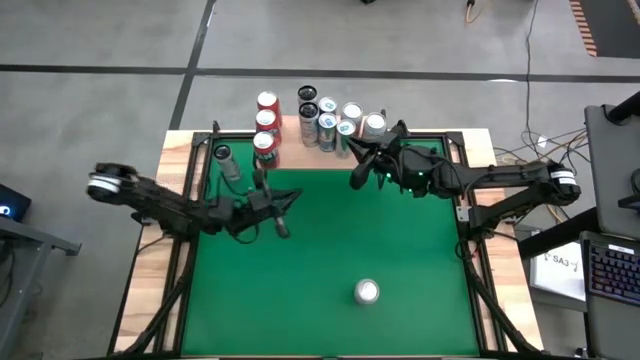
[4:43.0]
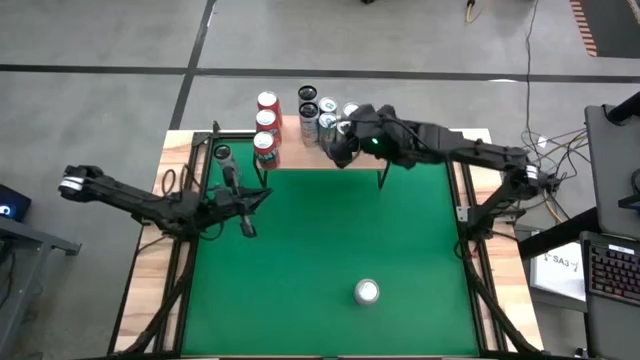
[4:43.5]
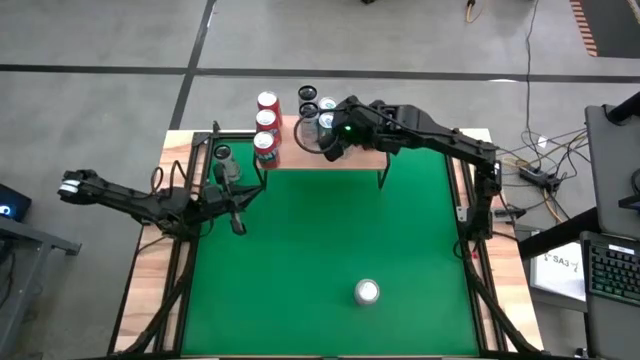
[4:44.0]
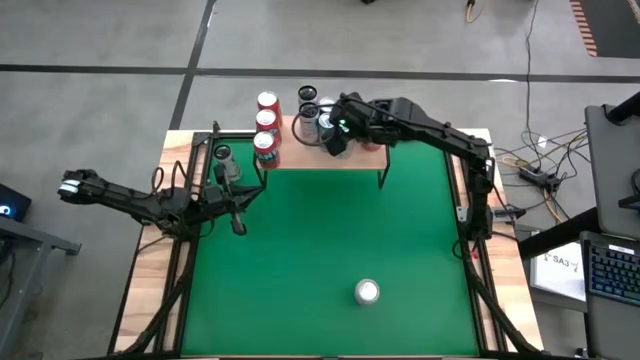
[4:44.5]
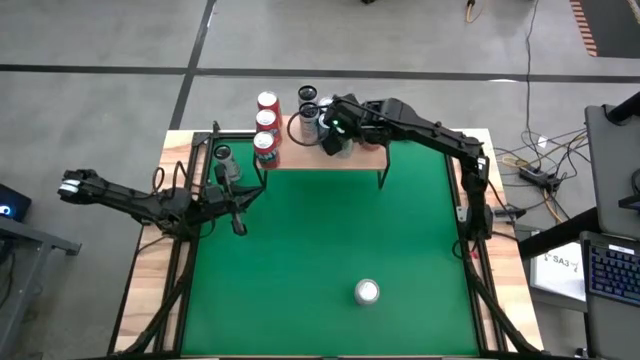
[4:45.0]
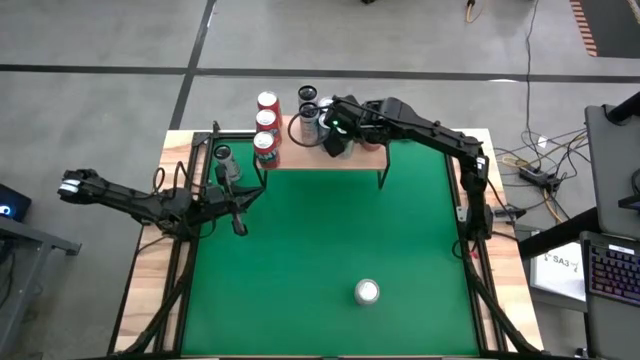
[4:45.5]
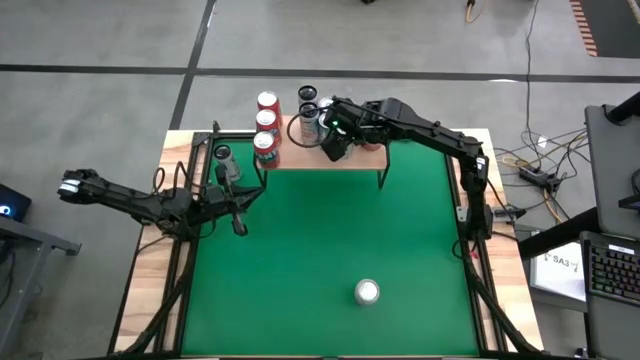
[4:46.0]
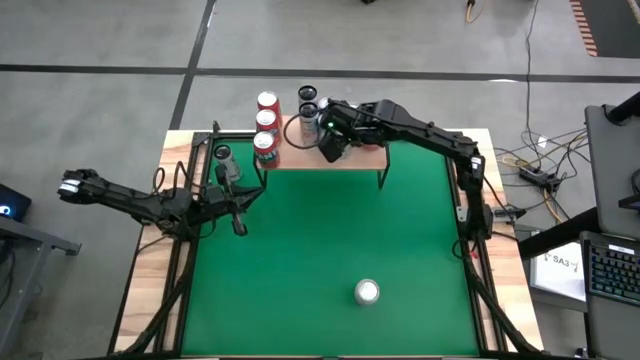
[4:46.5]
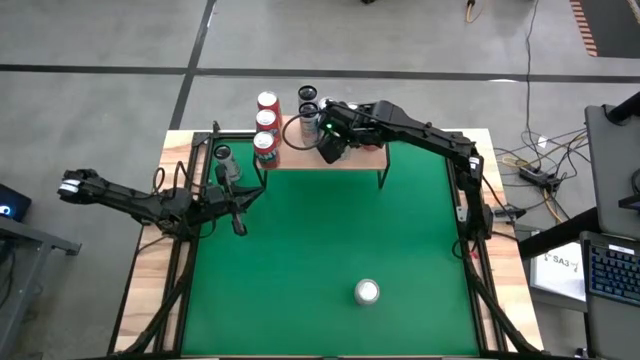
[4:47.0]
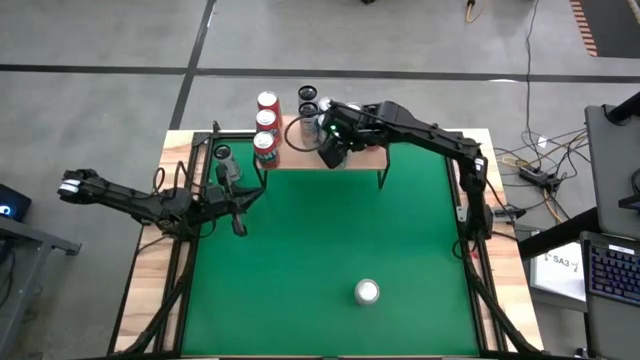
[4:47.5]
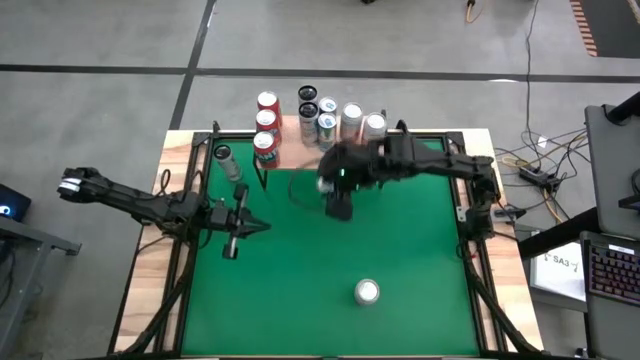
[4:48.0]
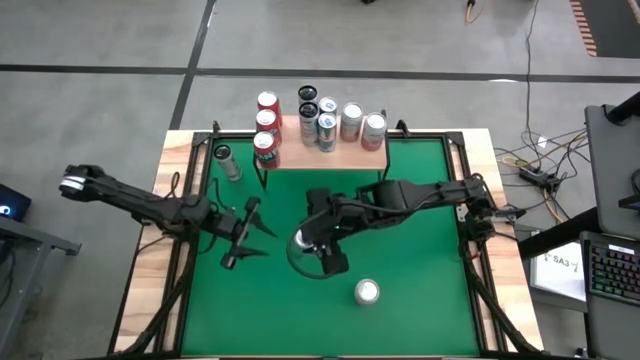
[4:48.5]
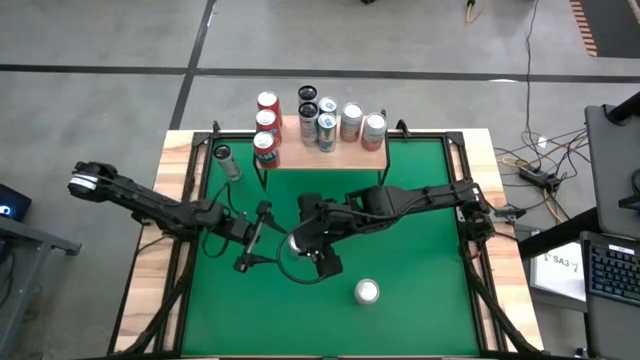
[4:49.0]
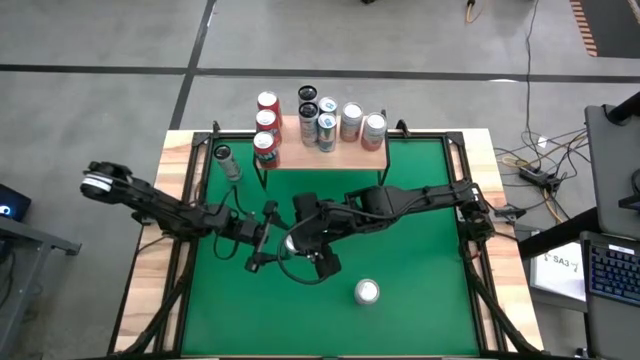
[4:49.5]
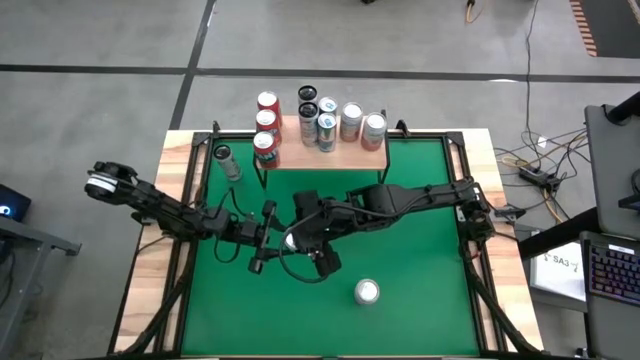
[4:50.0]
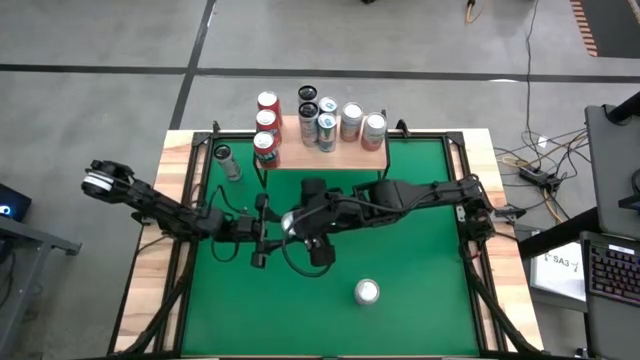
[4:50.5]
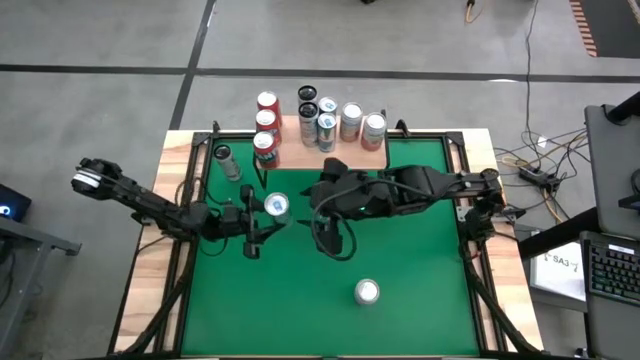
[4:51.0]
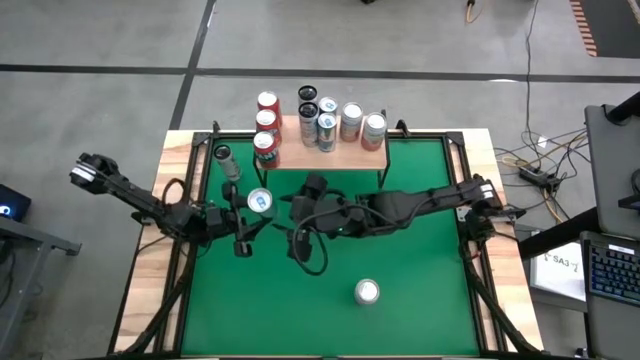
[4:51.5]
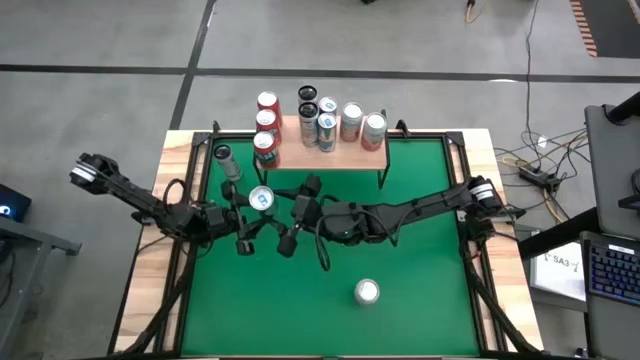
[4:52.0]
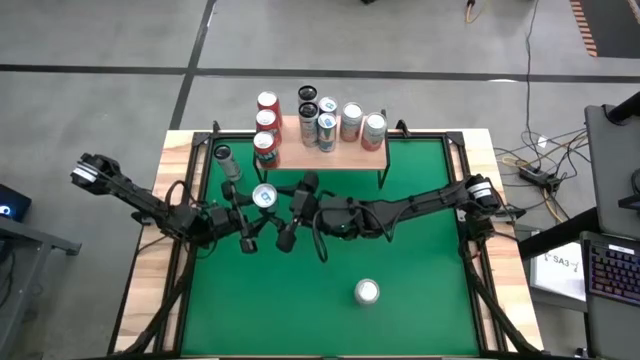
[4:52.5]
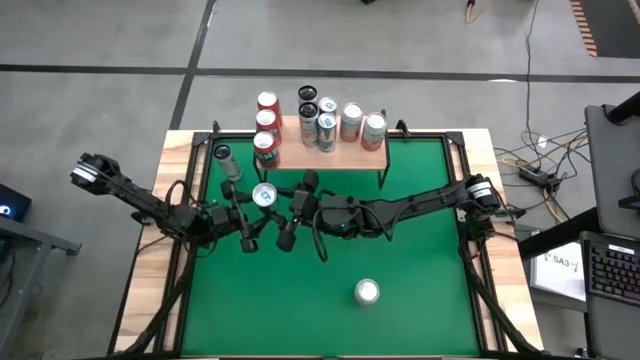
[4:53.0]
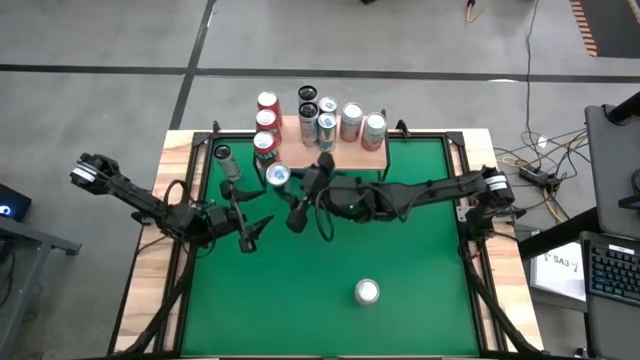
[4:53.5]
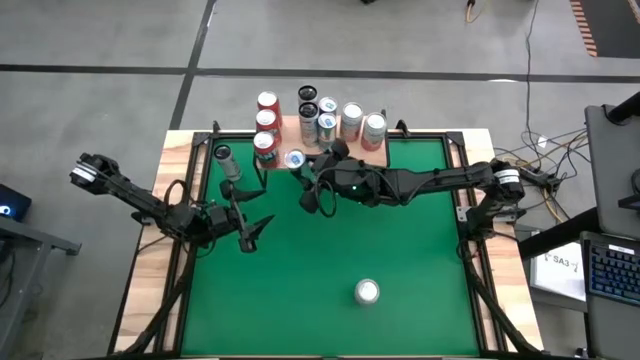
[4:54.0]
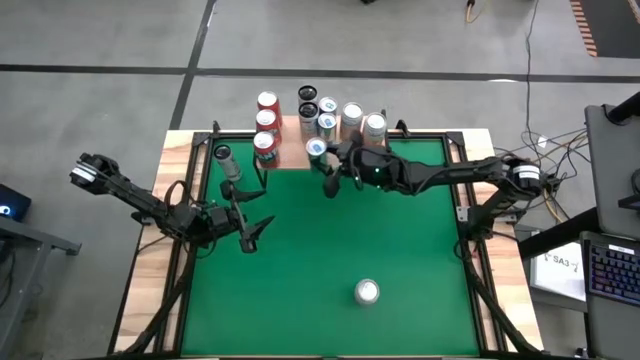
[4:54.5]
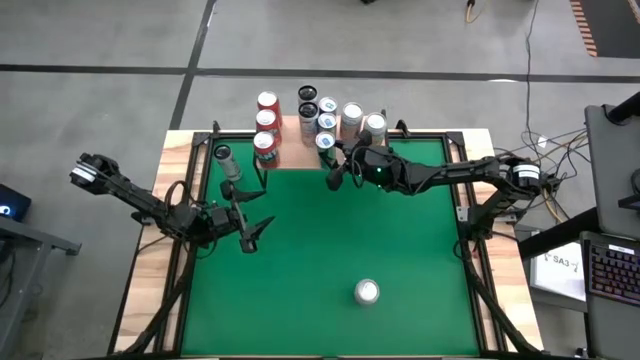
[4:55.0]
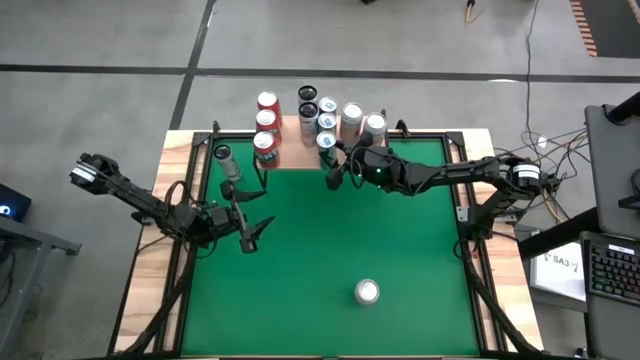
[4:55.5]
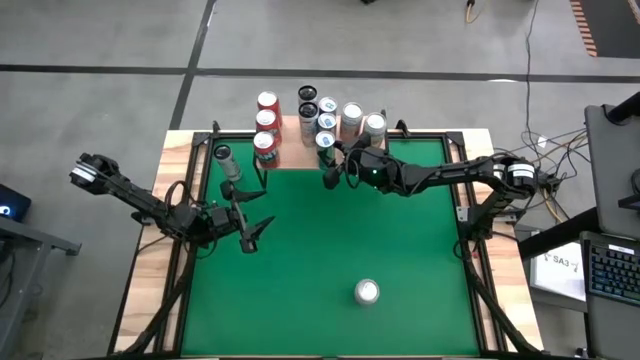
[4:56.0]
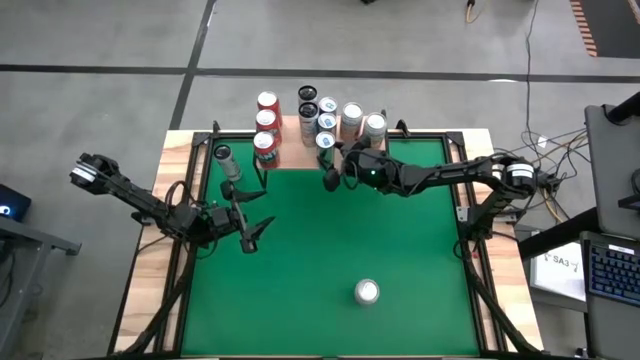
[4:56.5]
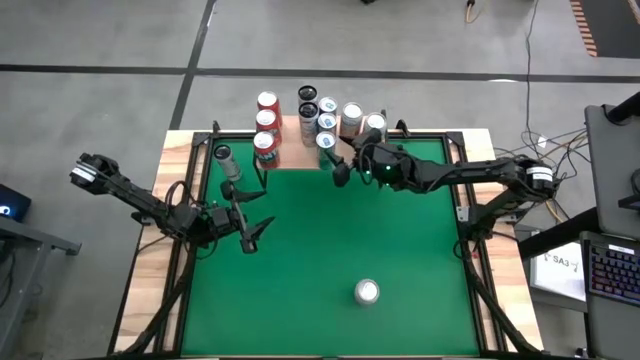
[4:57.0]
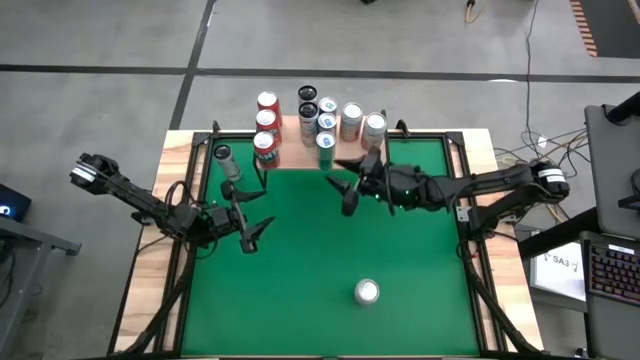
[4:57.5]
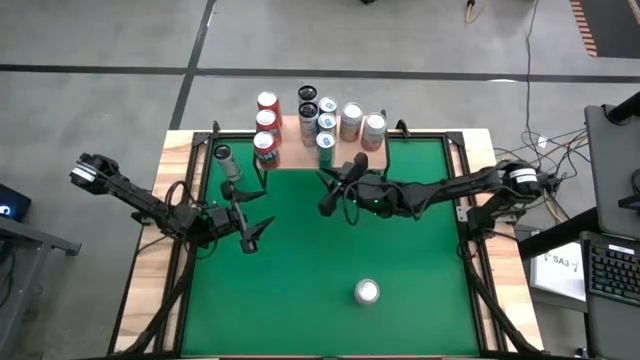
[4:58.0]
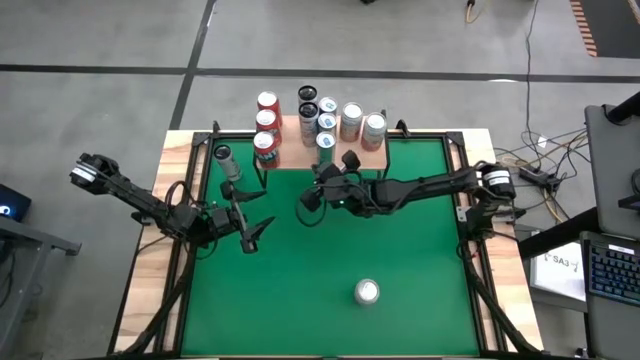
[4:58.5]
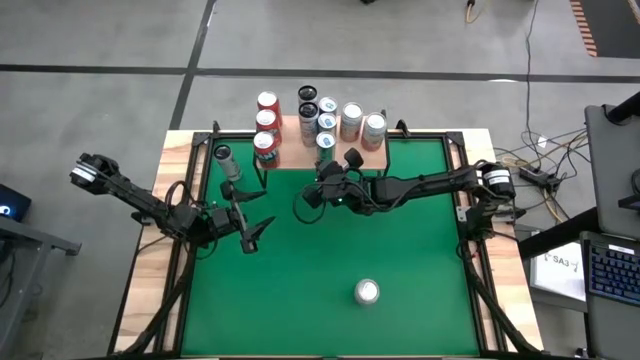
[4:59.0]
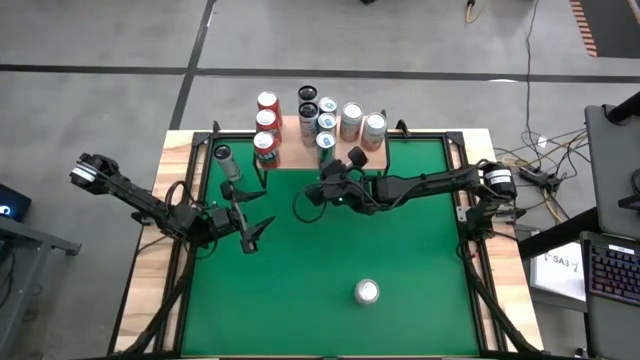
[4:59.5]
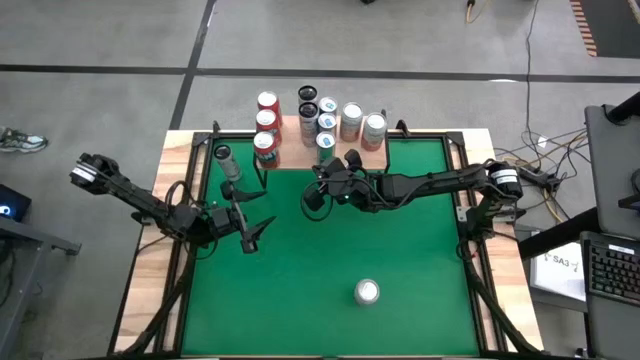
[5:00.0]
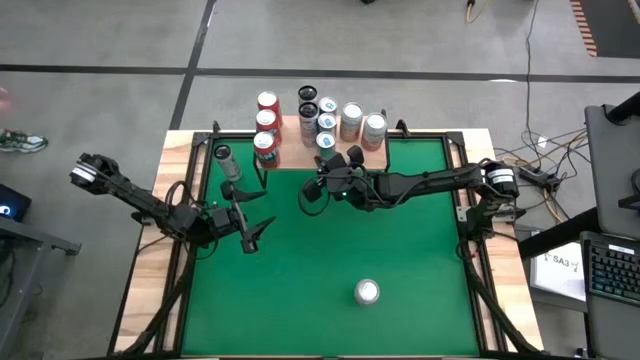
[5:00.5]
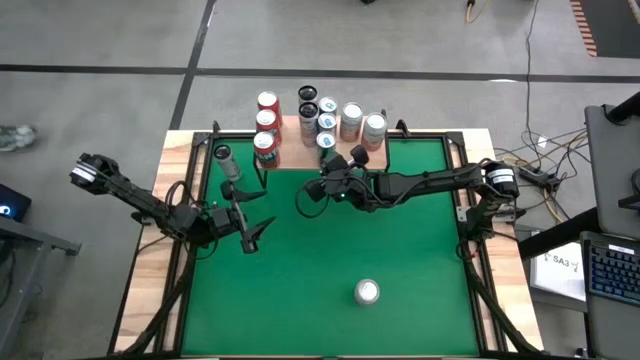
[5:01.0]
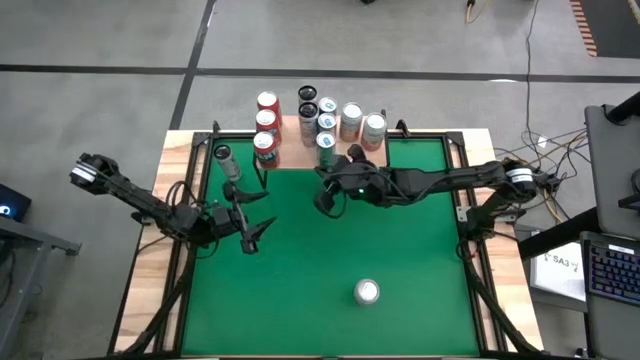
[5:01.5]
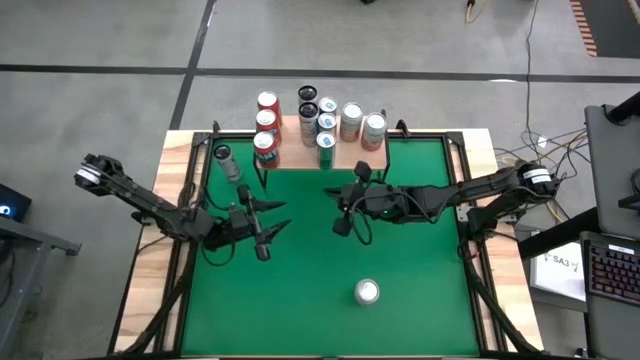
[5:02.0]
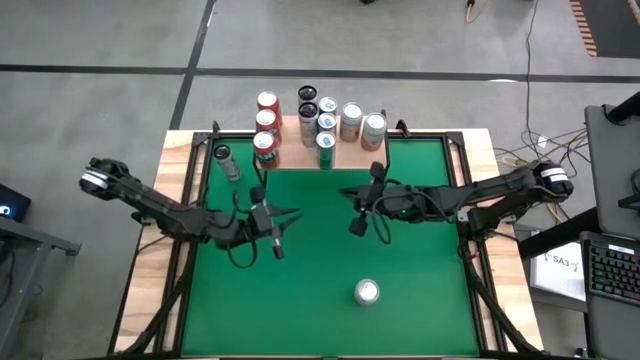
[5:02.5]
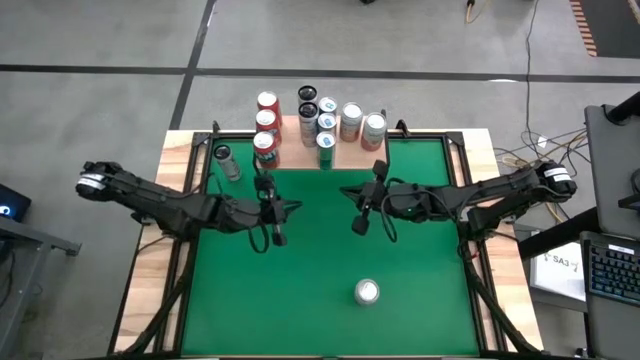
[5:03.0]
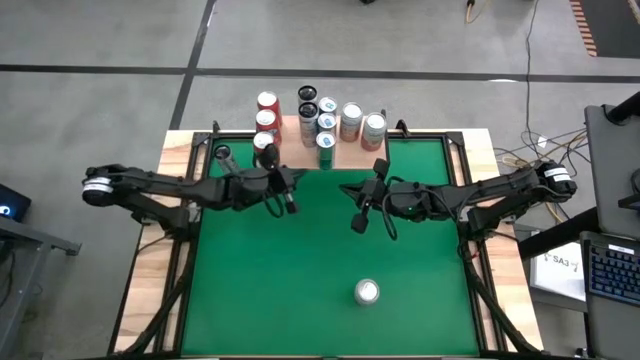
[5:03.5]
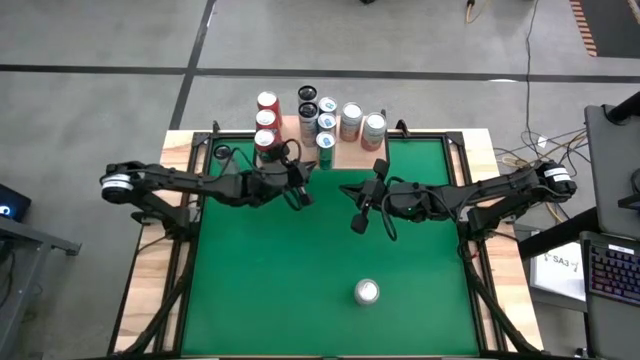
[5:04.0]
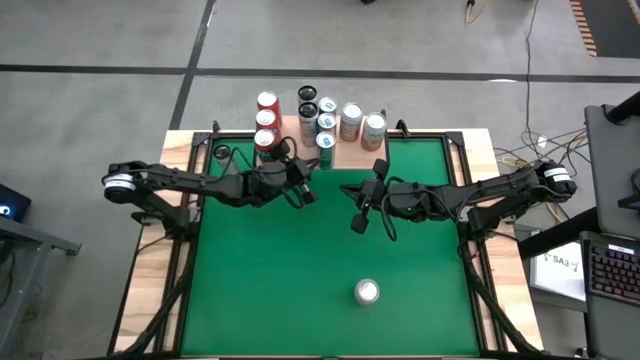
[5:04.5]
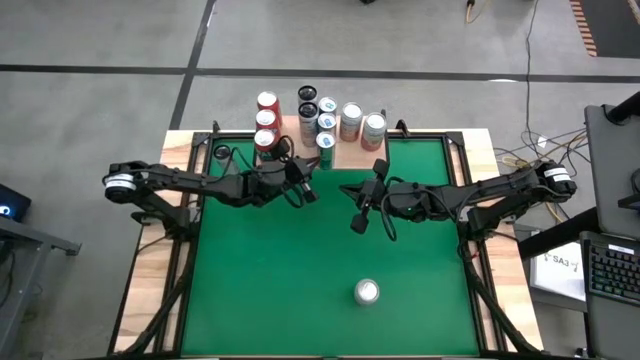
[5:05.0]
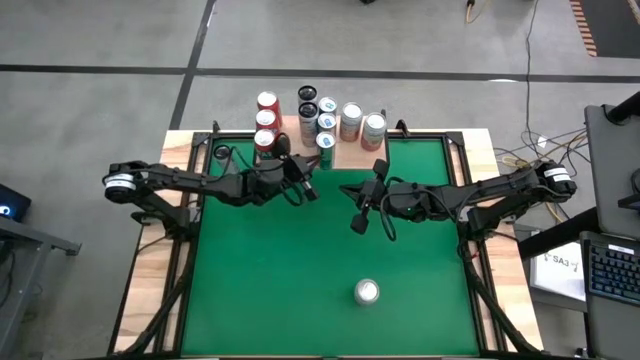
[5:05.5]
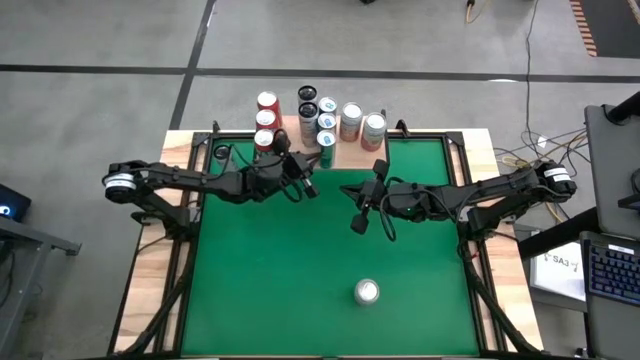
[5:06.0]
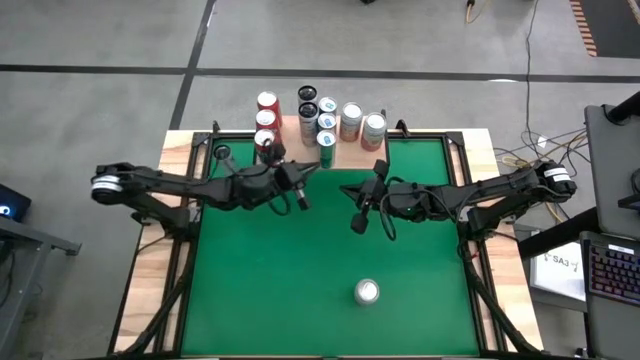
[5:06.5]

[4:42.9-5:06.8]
Task: Place canned beverage on shelf
Put the blue soda can on the shelf aligned with other blue soda cans
